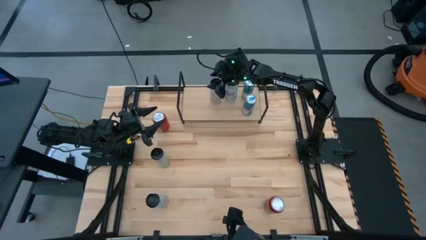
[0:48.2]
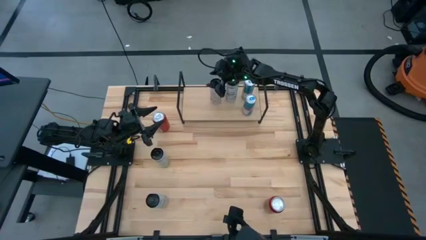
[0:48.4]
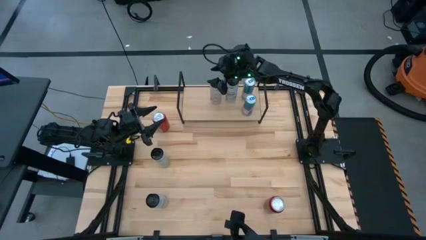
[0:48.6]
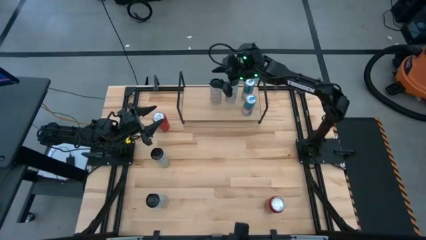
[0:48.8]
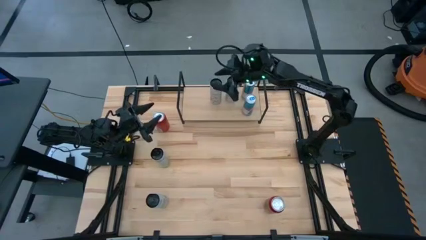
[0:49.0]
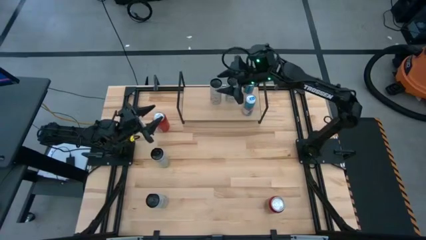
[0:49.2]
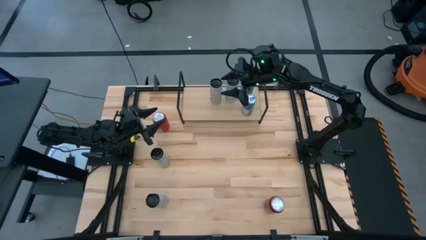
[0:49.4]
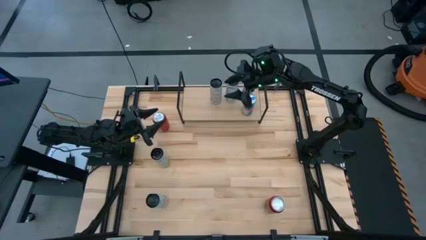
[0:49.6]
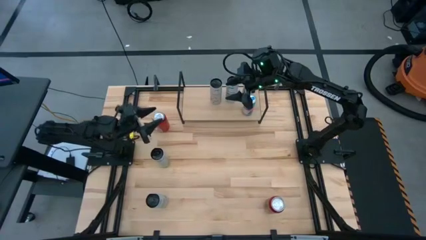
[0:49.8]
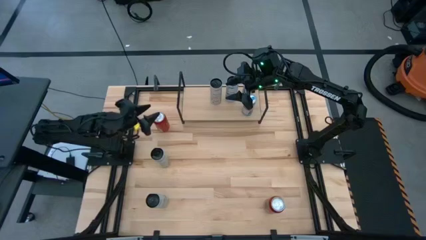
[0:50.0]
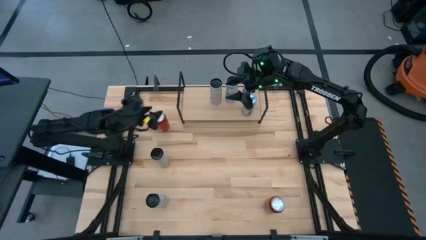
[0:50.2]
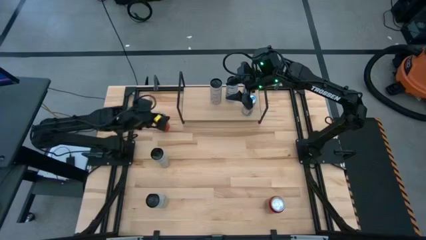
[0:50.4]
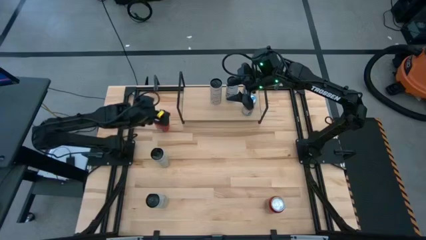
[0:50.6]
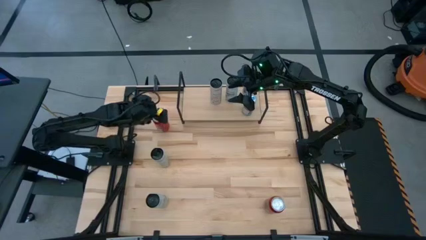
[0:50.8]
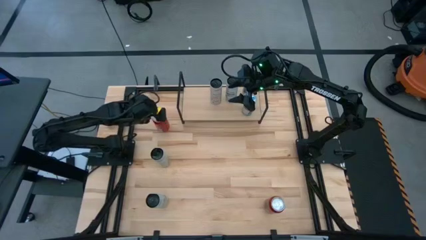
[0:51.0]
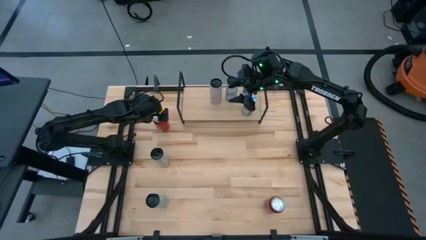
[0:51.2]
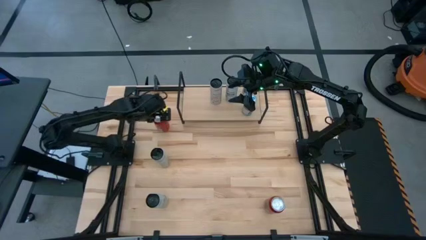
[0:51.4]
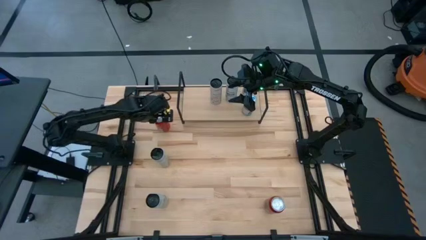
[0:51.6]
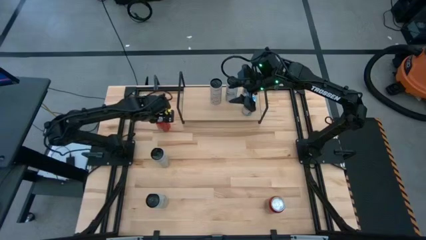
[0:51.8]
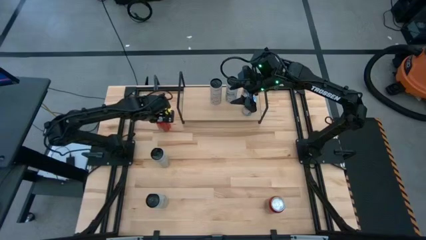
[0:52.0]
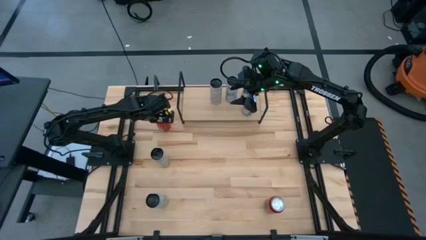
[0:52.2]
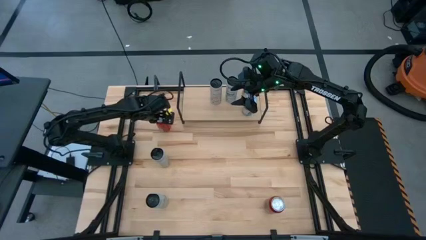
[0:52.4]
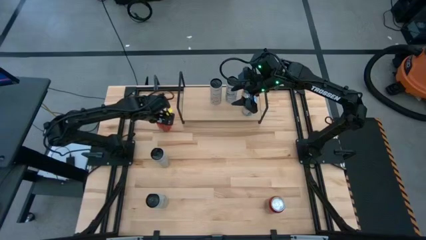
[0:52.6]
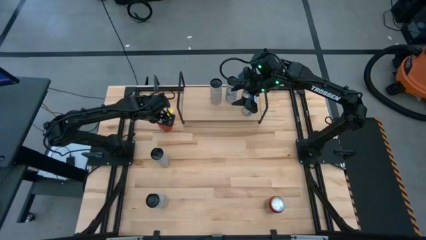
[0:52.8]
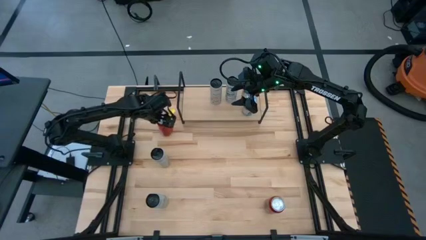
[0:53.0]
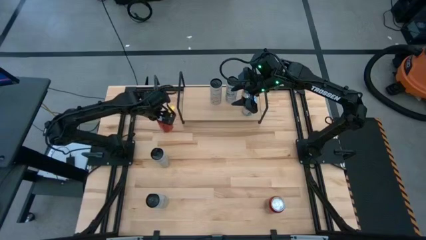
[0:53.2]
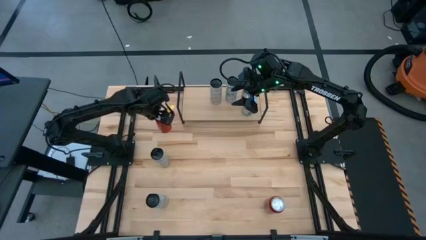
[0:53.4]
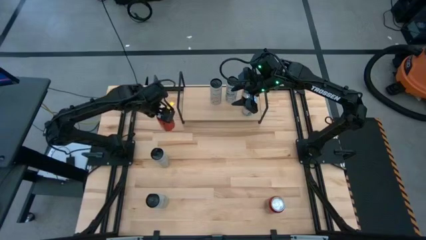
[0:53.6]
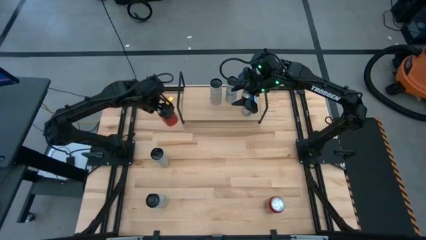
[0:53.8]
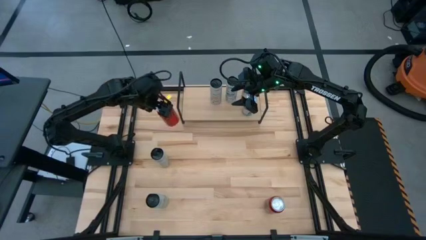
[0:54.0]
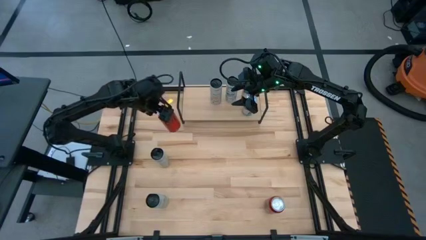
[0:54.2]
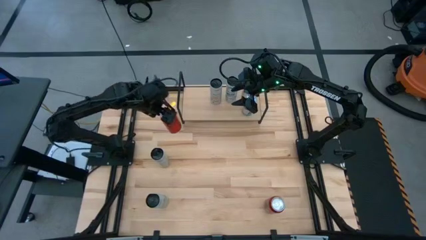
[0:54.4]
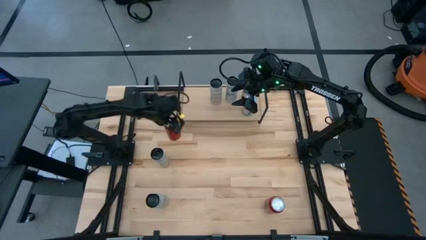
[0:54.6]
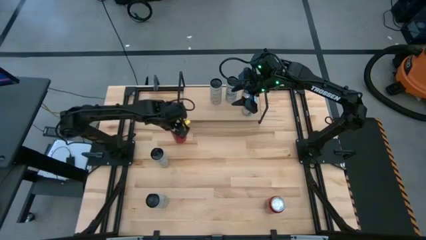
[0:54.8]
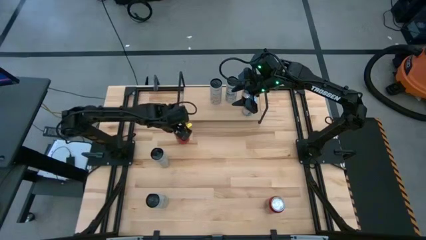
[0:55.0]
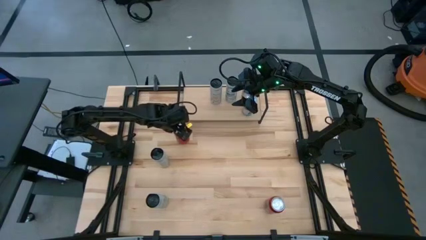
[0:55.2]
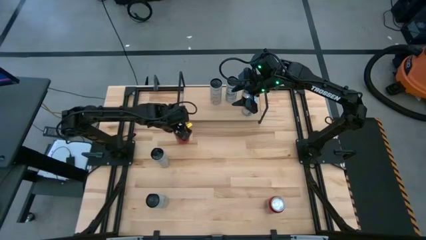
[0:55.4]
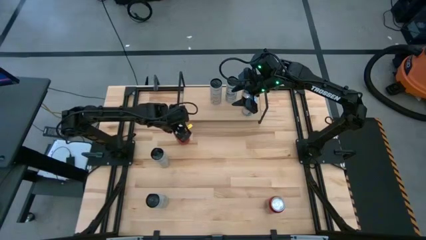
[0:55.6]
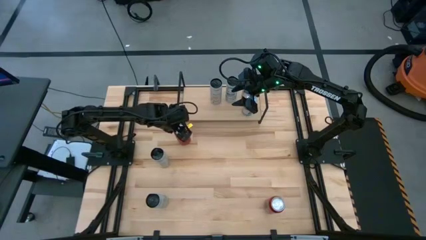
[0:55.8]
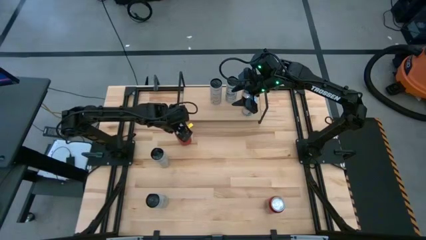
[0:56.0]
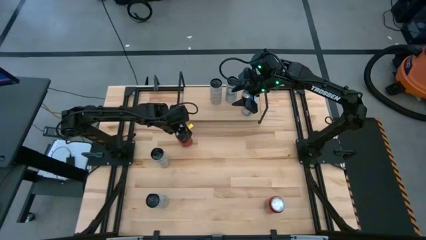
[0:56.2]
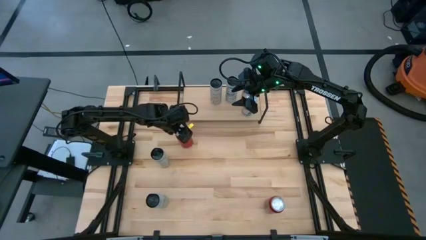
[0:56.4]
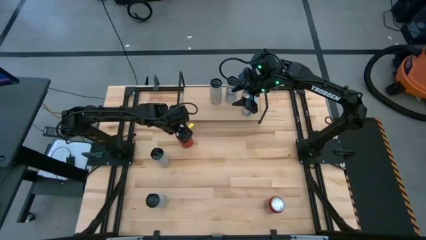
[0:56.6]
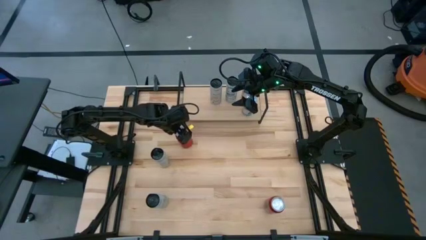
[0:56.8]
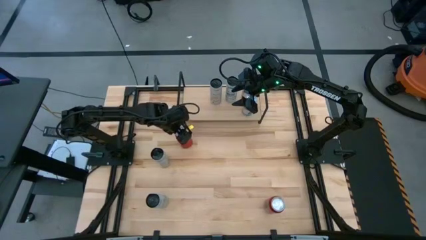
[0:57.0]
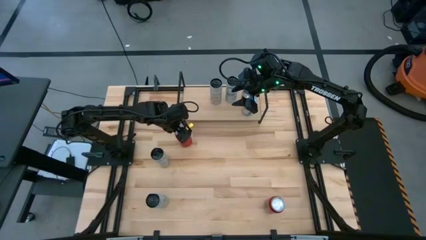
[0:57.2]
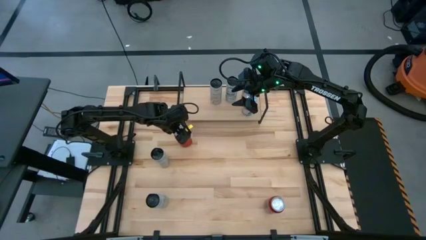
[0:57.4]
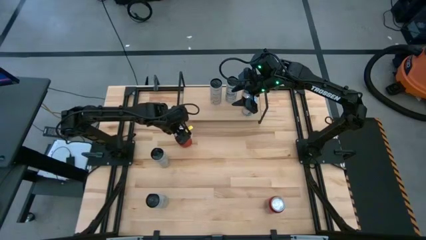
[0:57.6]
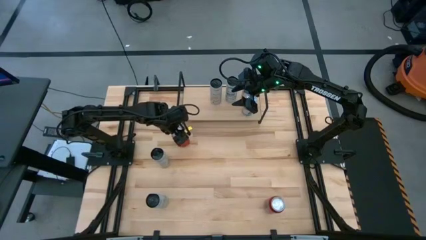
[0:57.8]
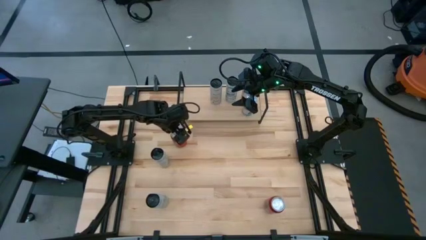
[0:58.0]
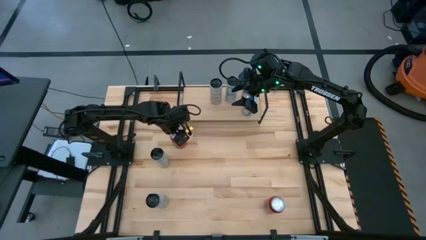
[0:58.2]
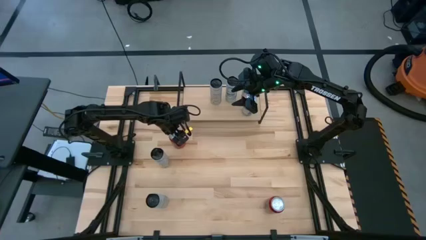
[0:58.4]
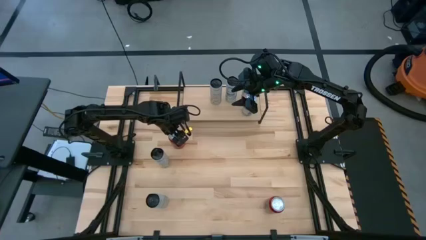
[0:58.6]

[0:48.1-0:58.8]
Task: Place canned beverage on shelf
Put the top red soda can on the shelf aligned with the other black soda can
